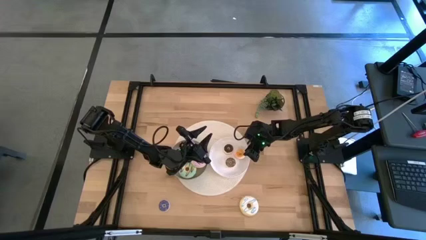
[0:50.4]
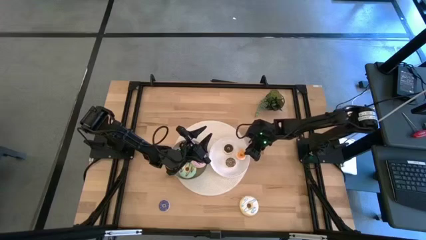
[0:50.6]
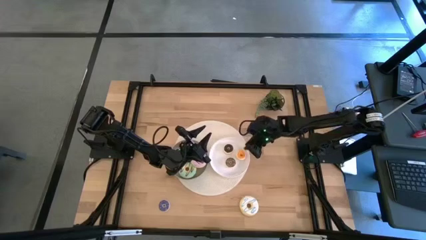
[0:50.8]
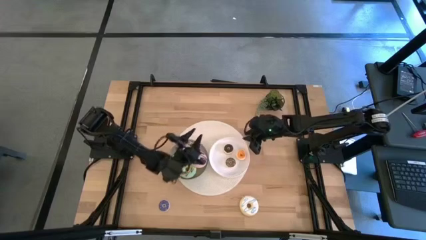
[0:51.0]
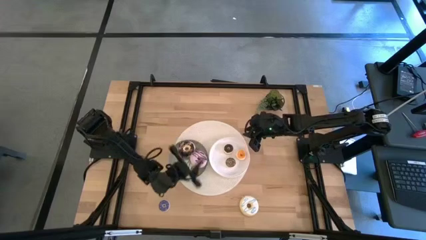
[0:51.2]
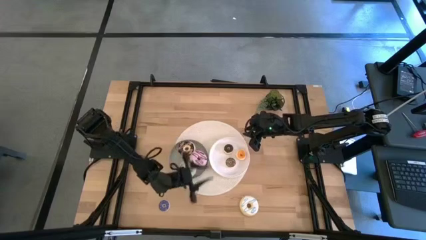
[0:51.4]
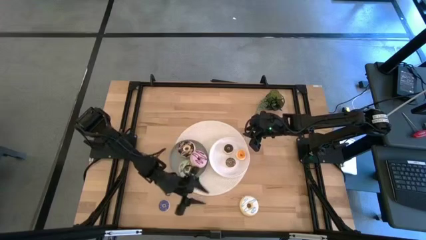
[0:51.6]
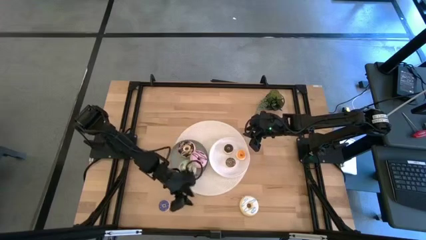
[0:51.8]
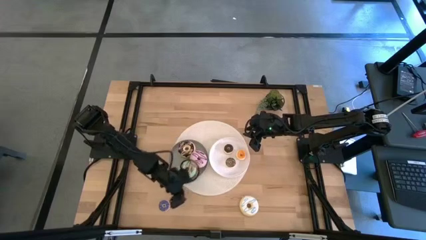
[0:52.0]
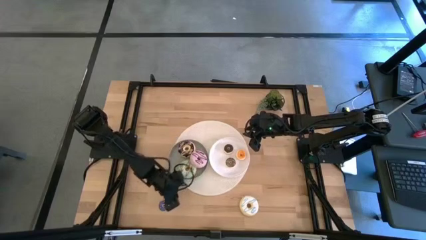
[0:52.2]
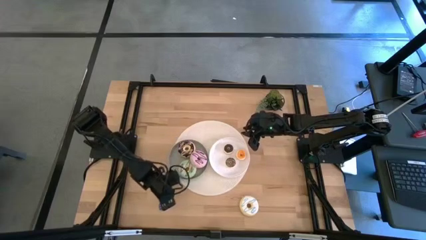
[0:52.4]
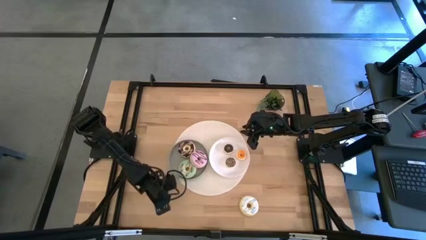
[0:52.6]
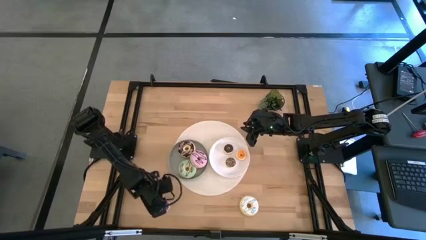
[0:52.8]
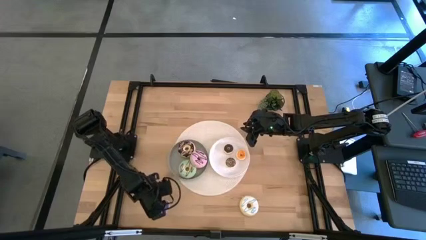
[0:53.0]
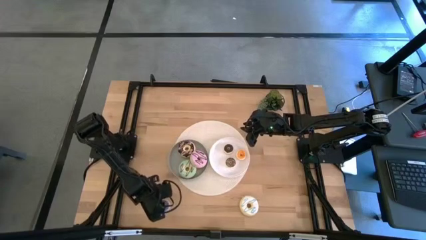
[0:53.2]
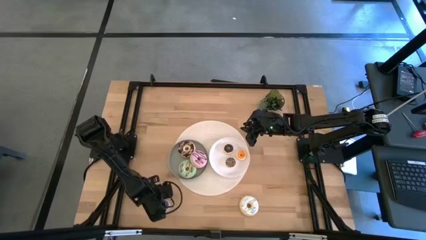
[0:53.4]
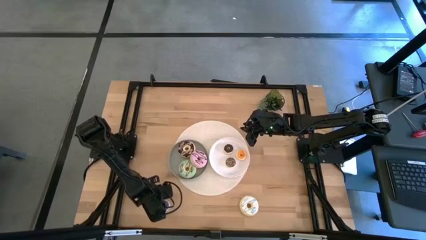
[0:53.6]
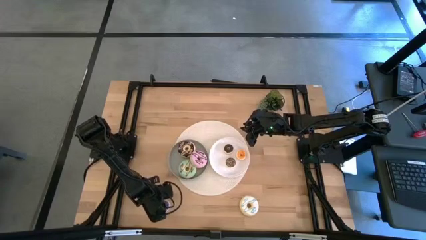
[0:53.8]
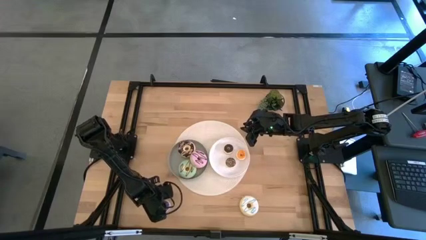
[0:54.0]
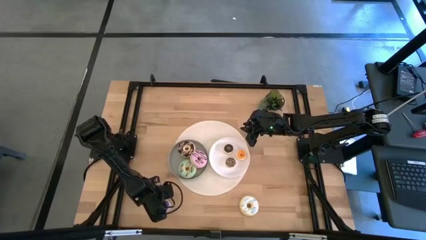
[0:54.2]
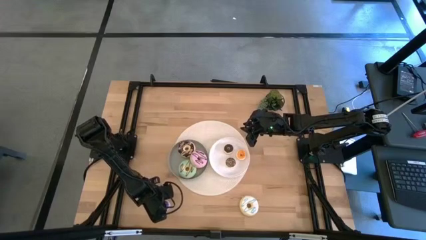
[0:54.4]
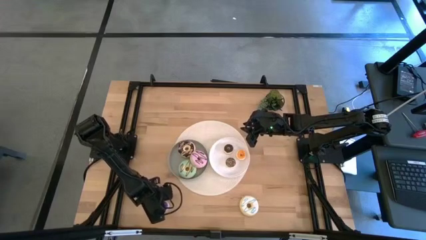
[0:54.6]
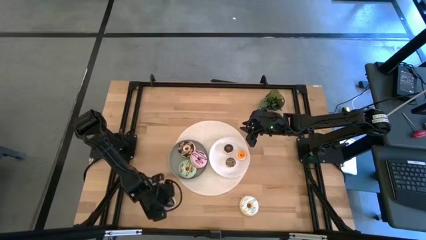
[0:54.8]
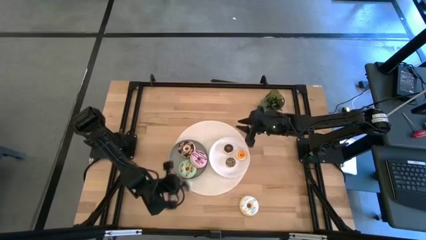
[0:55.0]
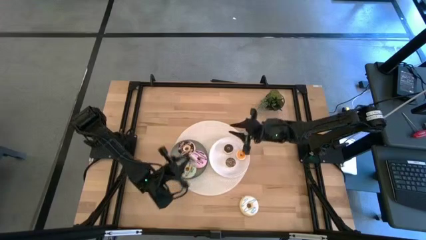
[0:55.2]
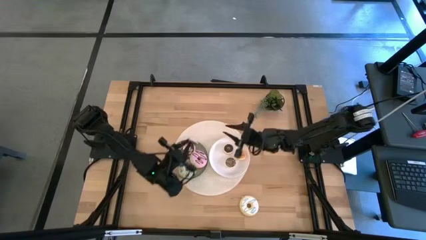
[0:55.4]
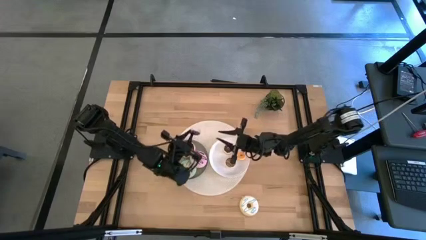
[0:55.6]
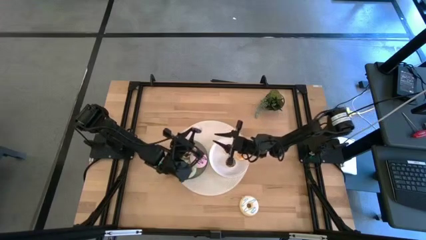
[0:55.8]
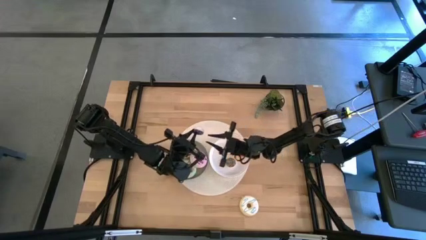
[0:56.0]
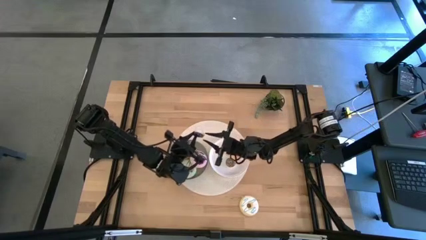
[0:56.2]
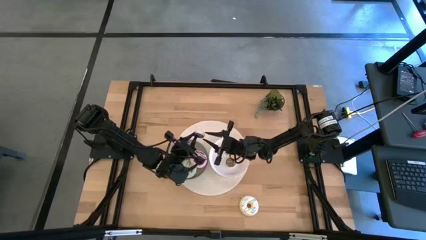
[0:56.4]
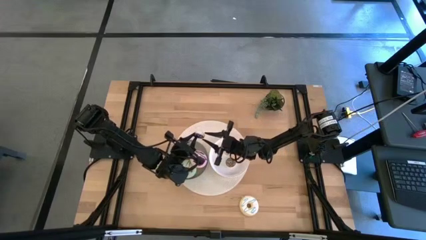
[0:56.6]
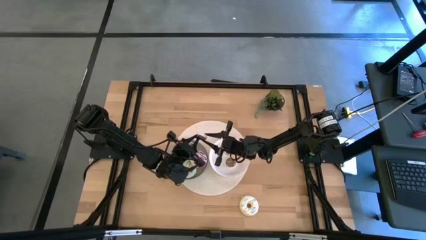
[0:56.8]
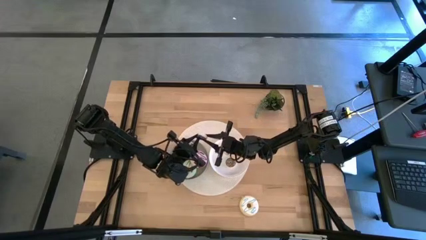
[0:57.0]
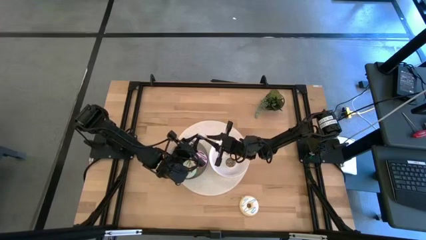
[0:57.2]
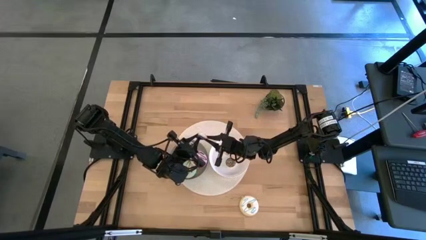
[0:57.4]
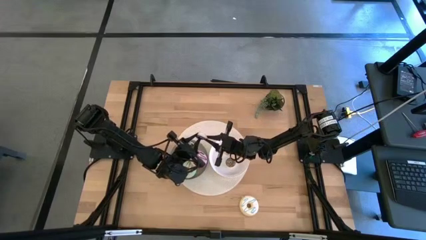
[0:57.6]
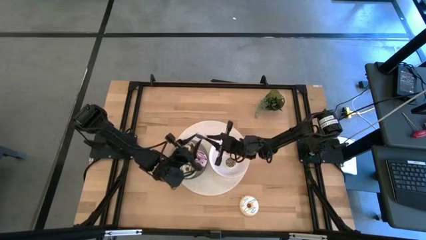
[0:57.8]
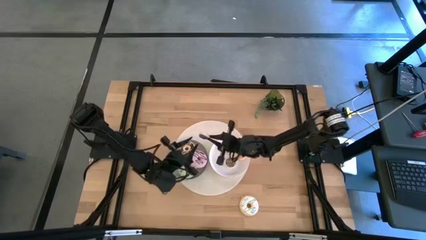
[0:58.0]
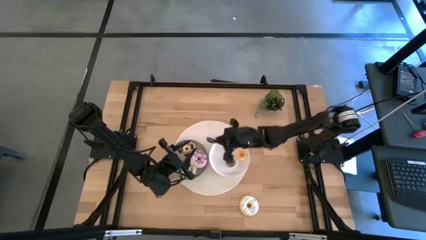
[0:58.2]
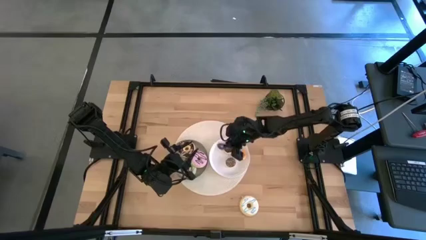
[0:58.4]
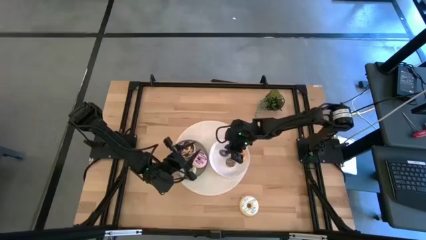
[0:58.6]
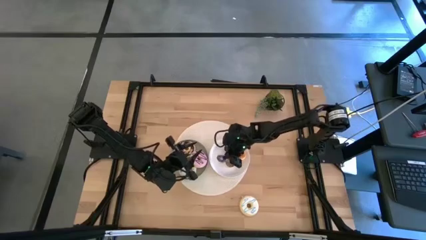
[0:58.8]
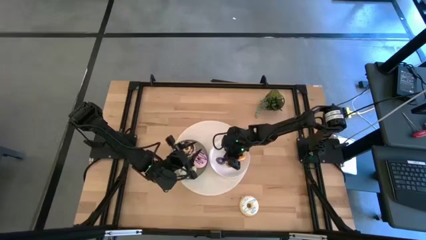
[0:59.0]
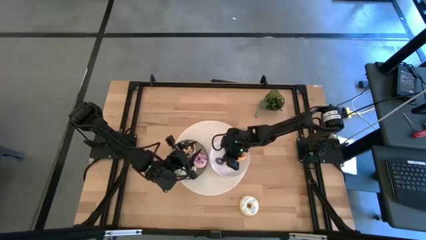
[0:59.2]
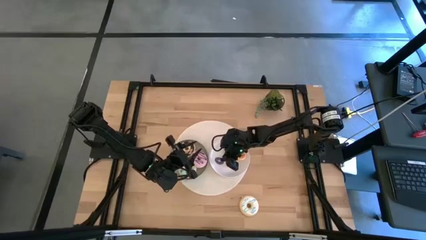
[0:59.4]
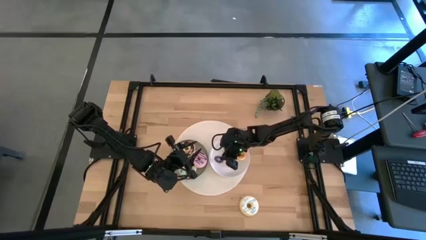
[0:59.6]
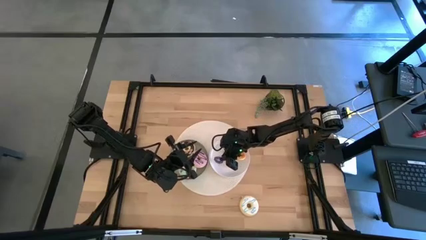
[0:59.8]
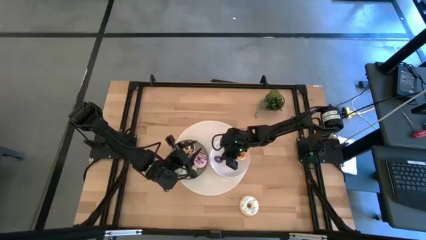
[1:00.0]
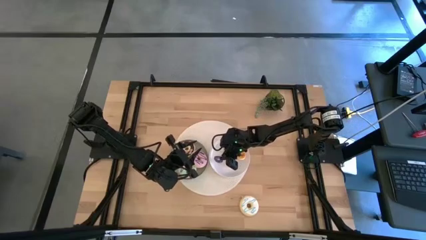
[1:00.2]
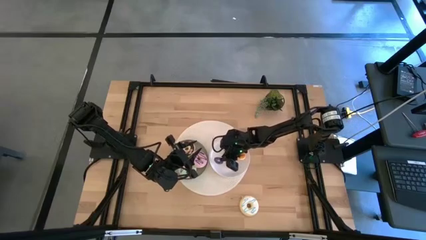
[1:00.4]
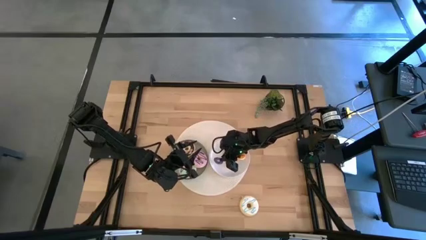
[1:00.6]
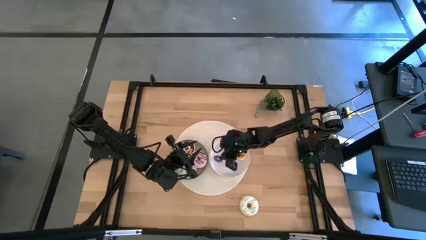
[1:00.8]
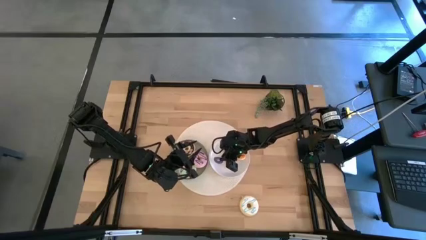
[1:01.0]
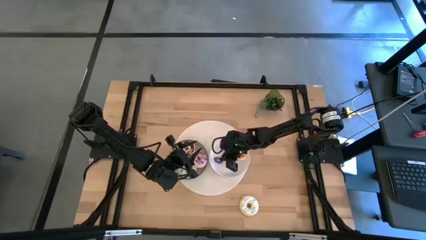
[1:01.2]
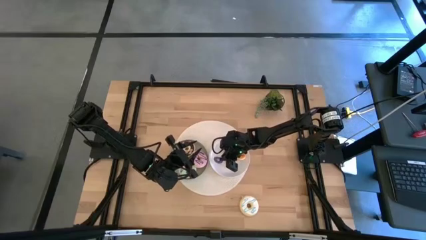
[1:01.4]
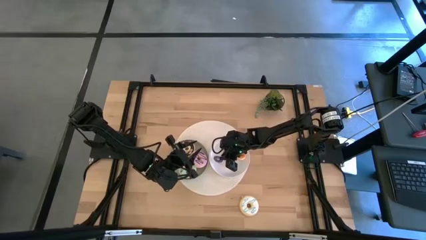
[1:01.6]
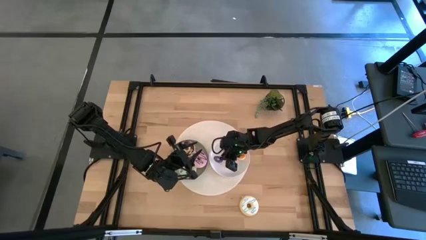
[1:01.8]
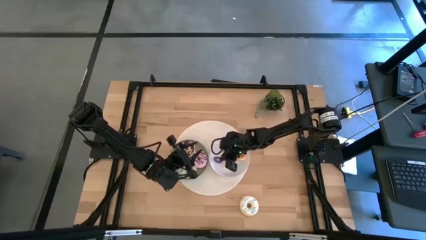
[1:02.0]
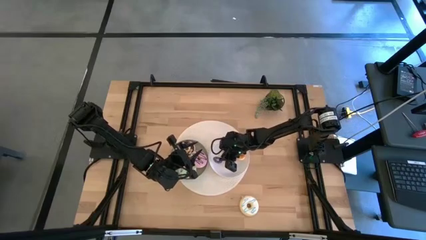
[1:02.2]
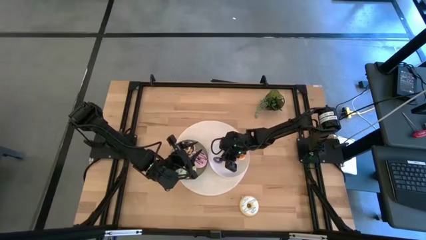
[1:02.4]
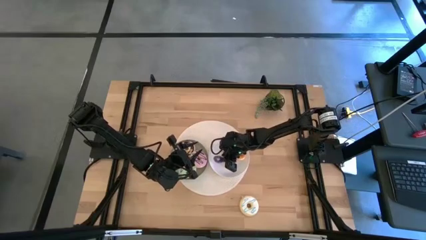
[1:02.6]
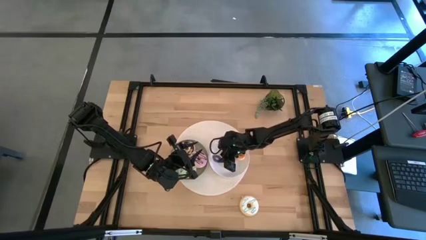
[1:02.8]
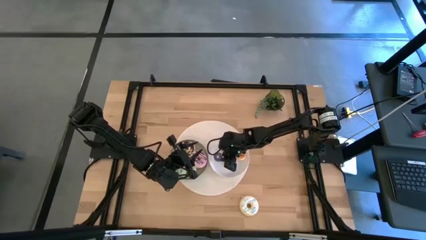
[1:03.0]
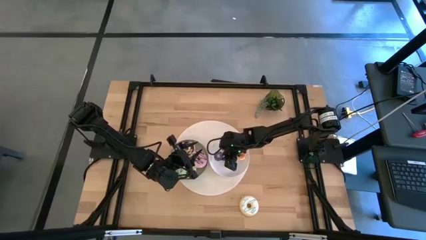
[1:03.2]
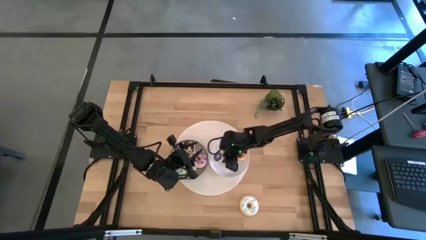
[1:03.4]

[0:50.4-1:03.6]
Task: Pick & Place donuts
Put the small violet donut on the white plate

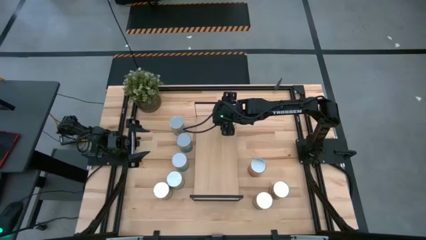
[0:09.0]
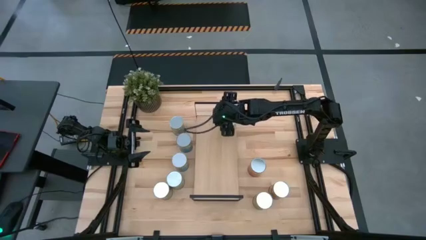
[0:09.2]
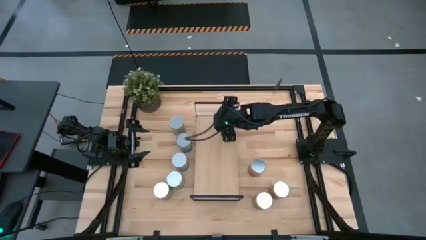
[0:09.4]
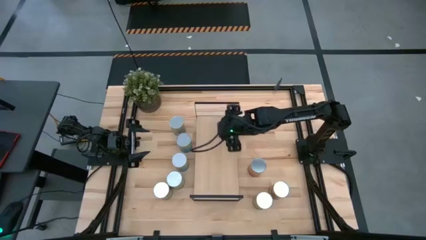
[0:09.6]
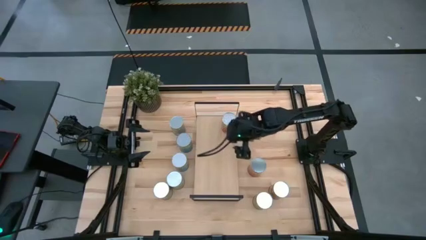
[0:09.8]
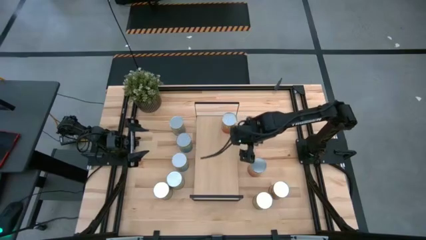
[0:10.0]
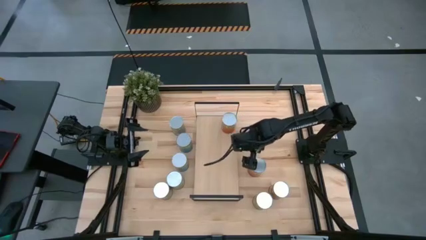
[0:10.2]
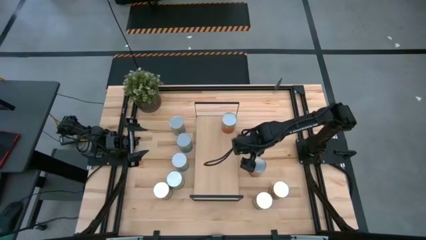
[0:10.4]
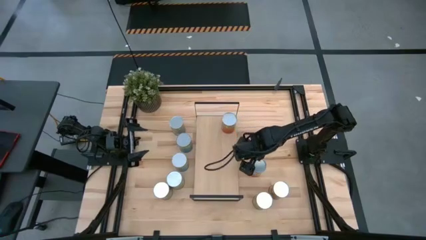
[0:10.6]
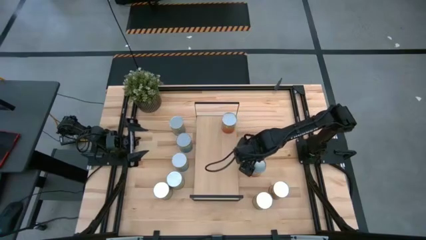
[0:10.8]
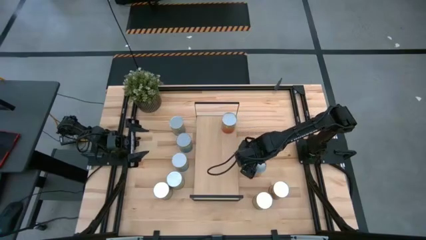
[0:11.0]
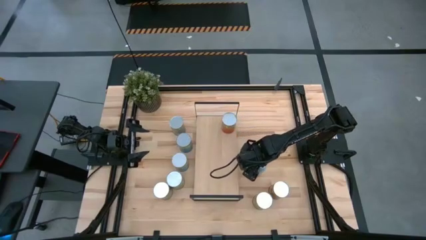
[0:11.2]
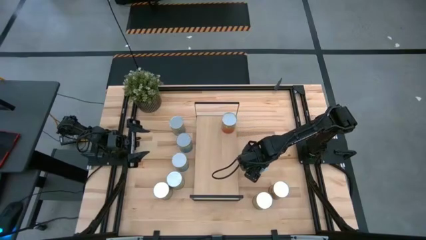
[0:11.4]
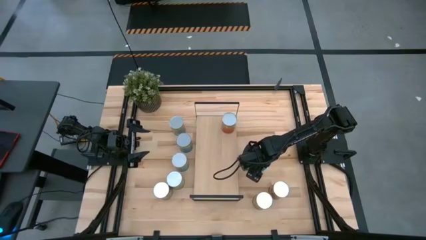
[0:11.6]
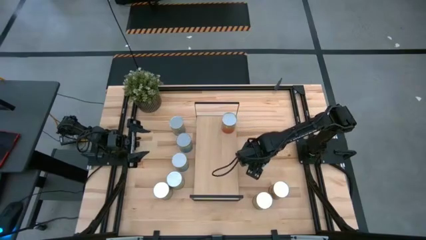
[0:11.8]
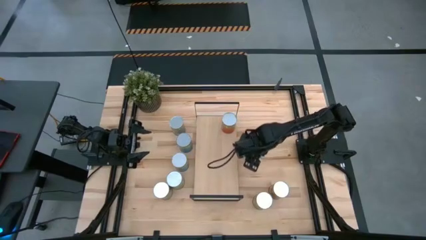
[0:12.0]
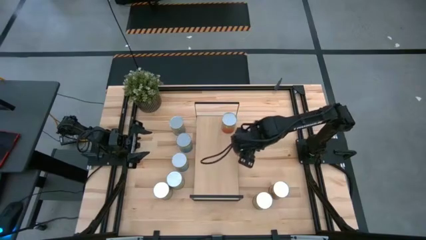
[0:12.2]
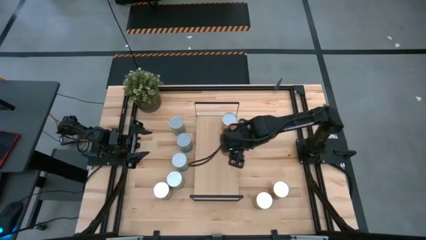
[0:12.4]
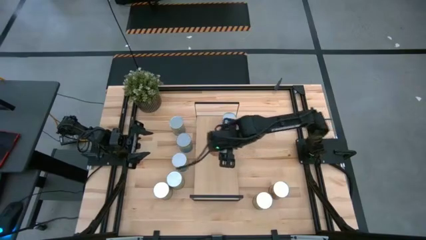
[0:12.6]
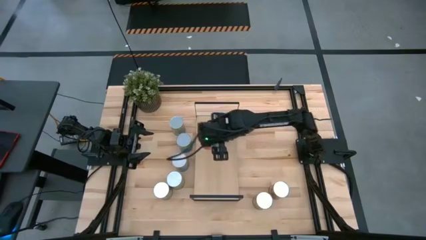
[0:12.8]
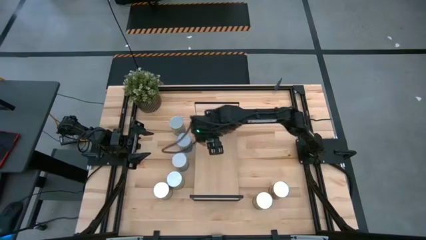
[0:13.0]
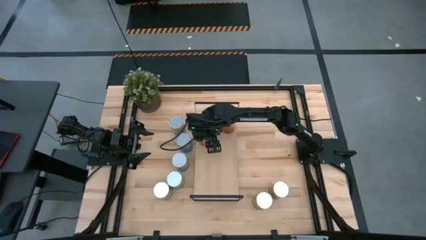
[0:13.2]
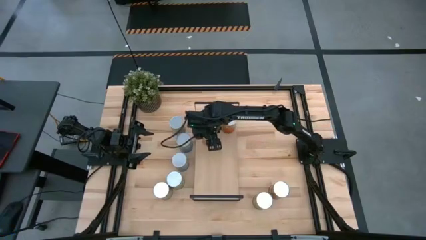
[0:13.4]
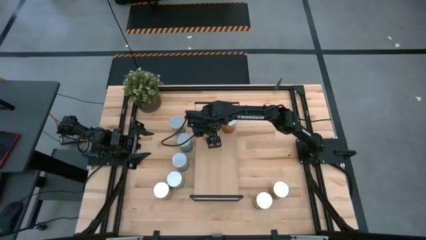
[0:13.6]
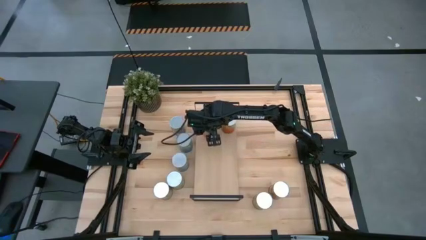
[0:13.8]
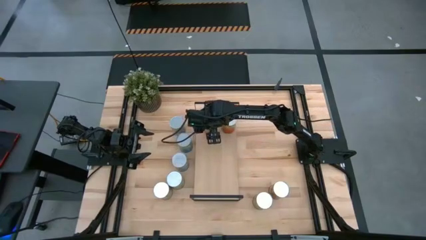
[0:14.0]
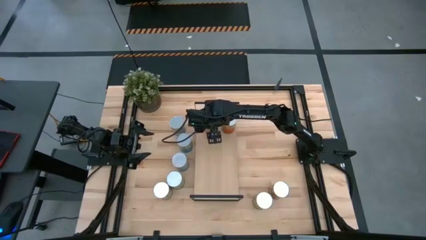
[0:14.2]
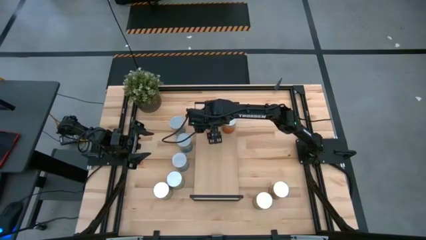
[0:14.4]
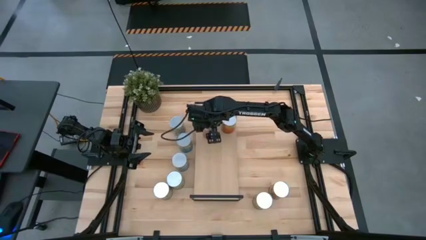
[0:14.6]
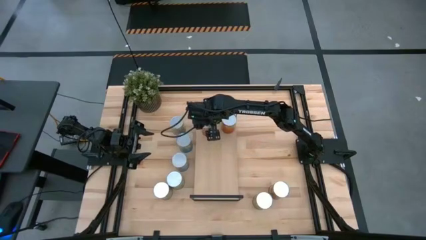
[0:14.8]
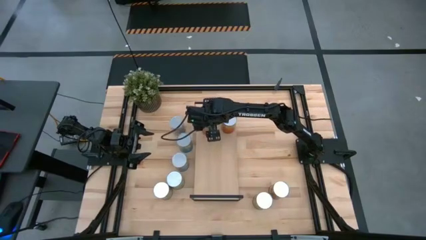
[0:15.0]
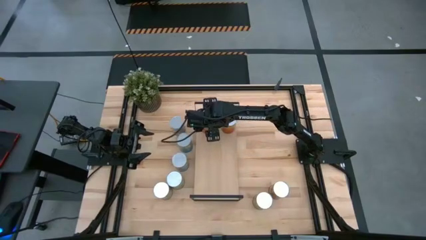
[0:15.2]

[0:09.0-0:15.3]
Task: Pick and place cans onto a shelf
Put the canned pineapple on the shelf
